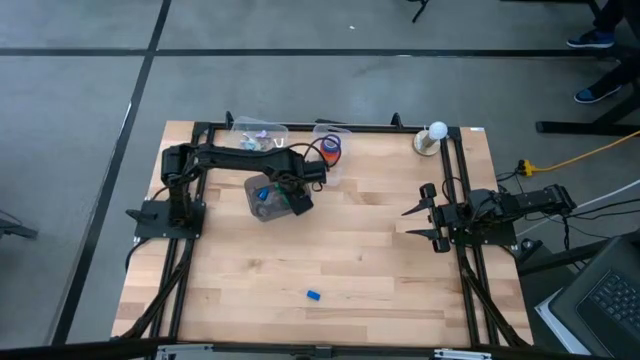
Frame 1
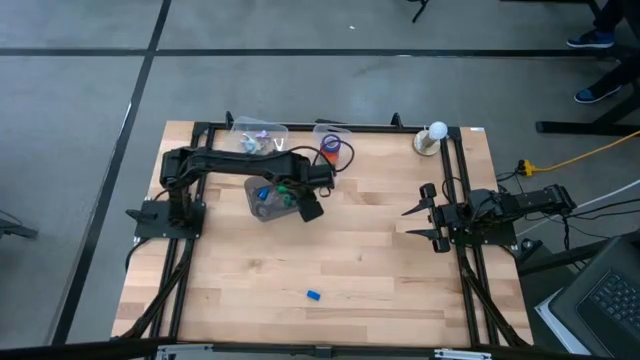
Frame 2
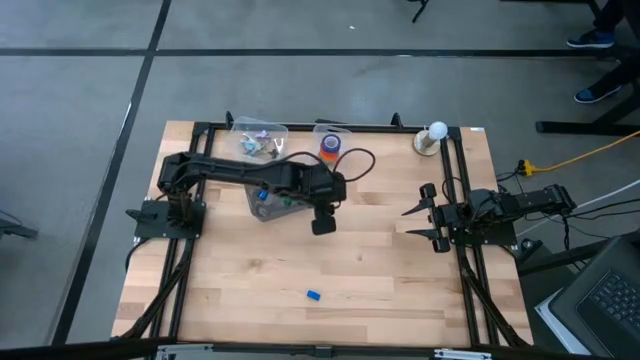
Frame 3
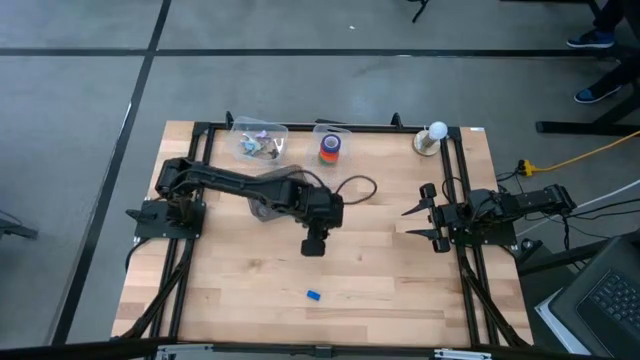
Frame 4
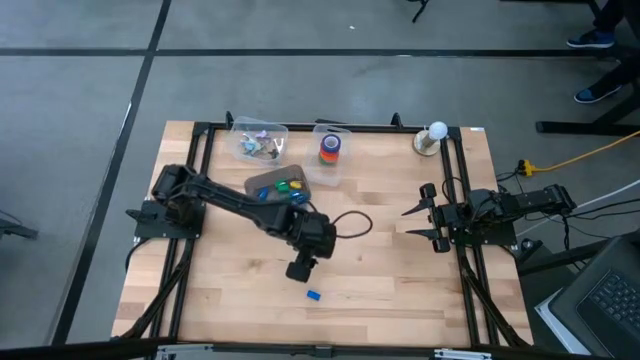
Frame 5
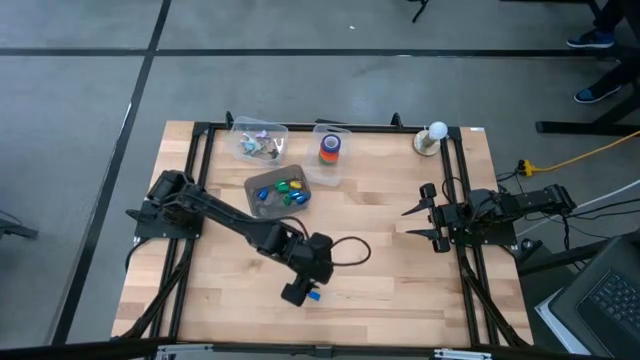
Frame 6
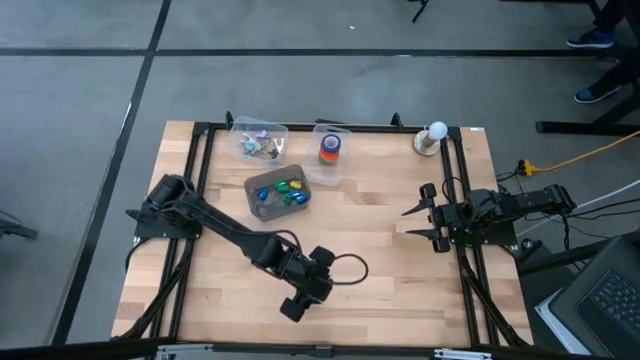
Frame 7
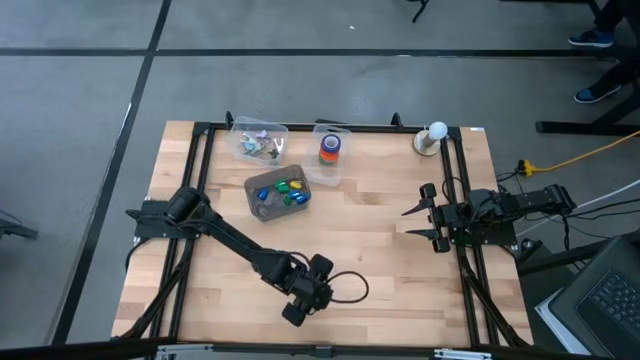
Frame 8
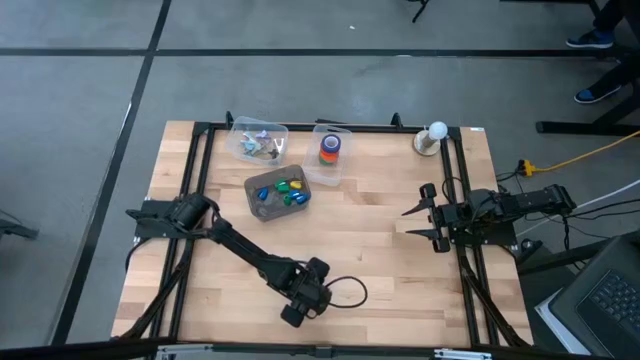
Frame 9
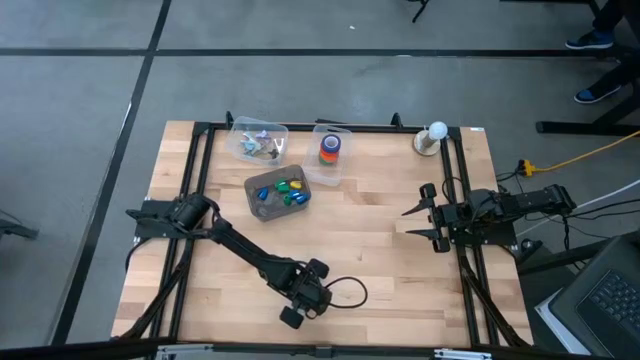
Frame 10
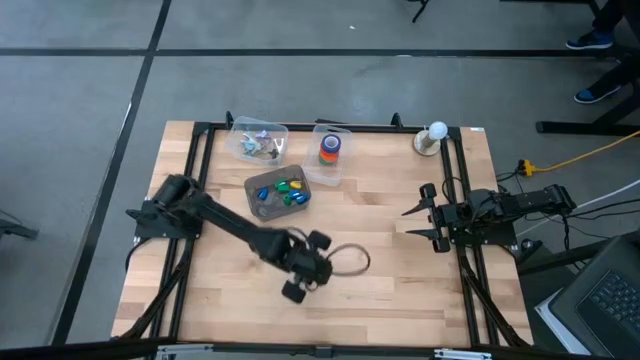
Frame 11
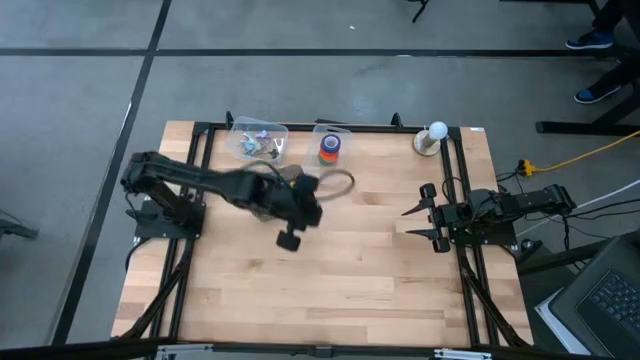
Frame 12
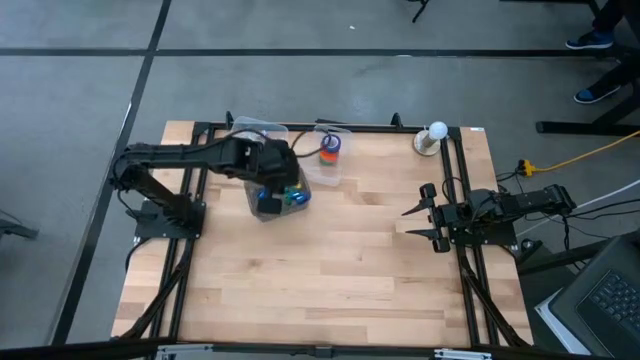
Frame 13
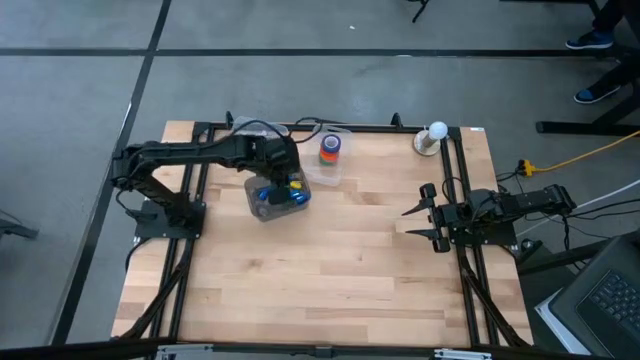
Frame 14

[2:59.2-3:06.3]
Task: Pick and place Stapler, Stapler remover, tape
Put the blue stapler into the black bin

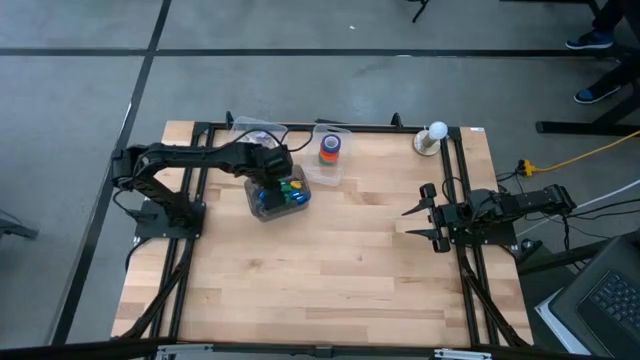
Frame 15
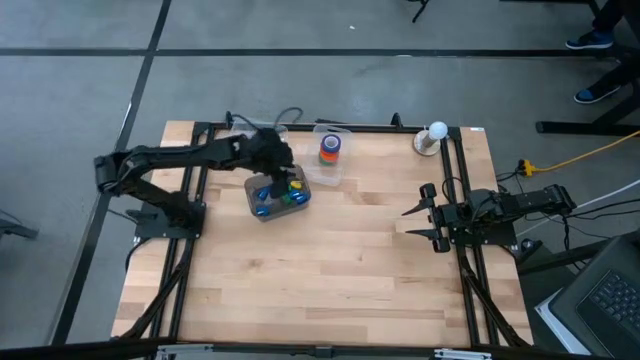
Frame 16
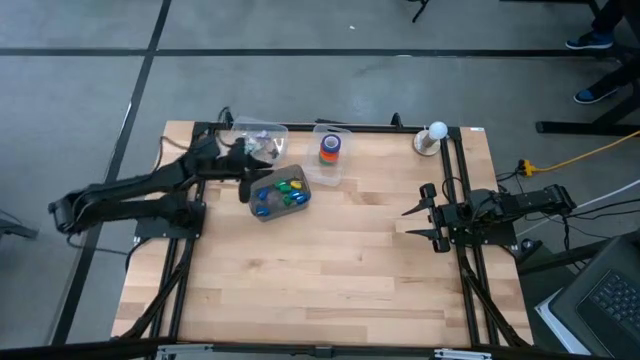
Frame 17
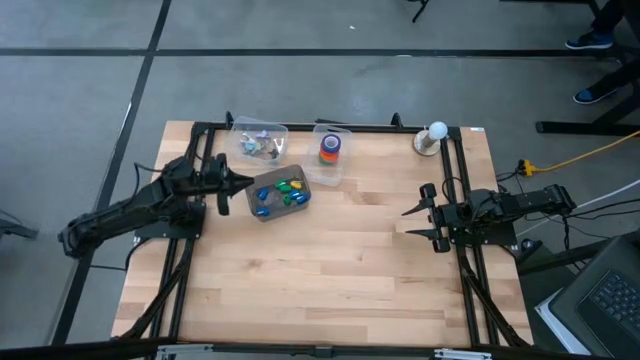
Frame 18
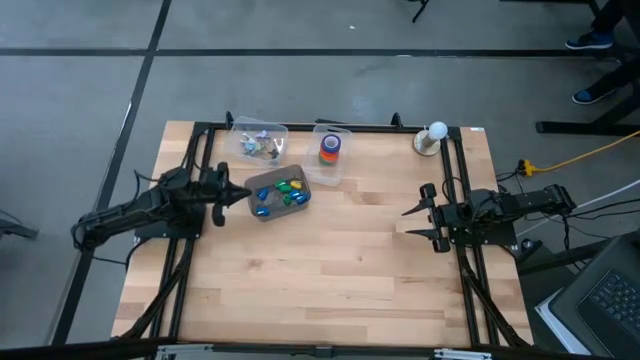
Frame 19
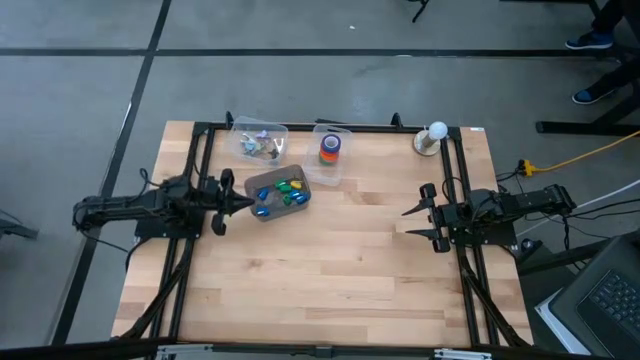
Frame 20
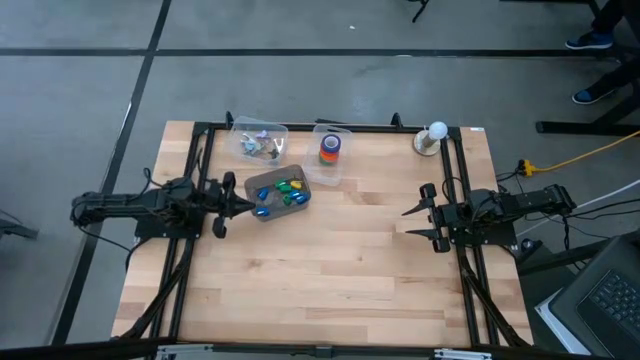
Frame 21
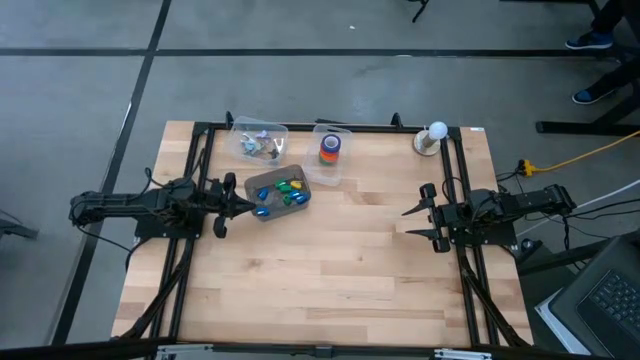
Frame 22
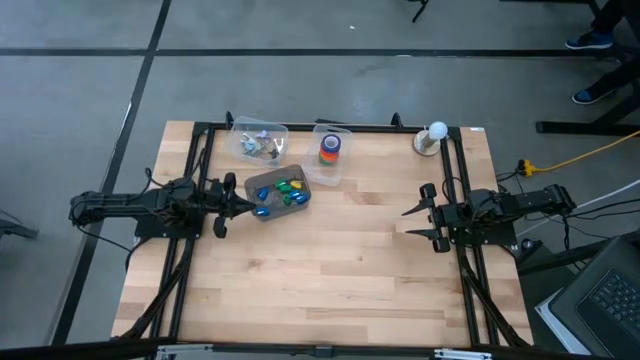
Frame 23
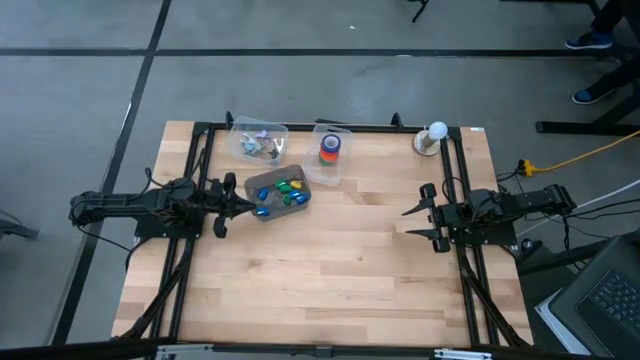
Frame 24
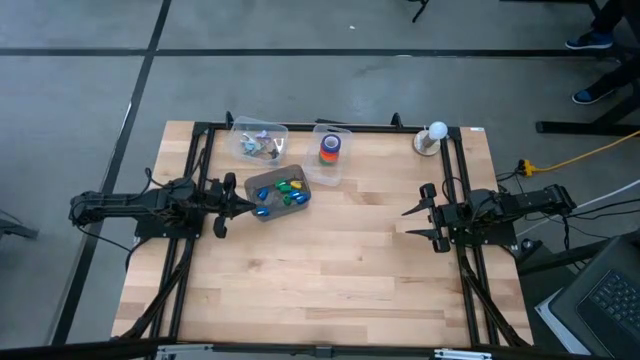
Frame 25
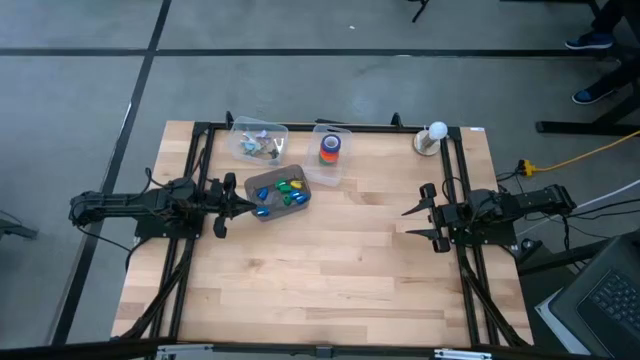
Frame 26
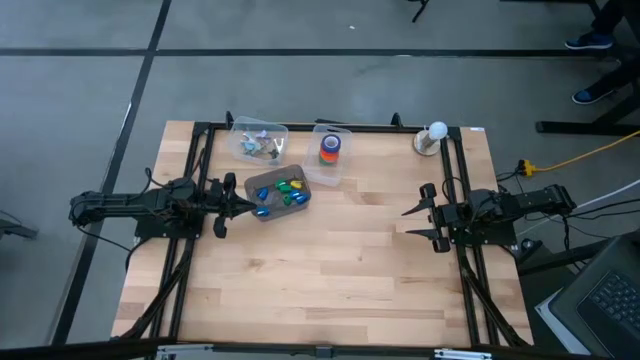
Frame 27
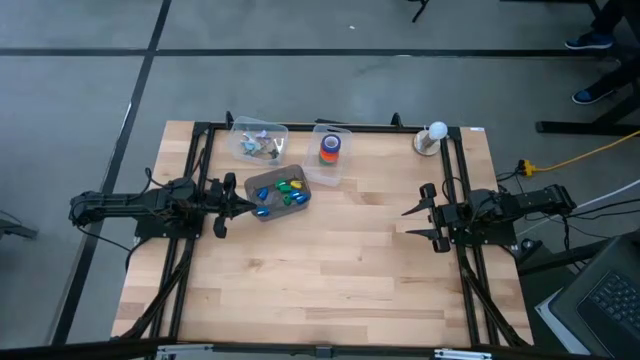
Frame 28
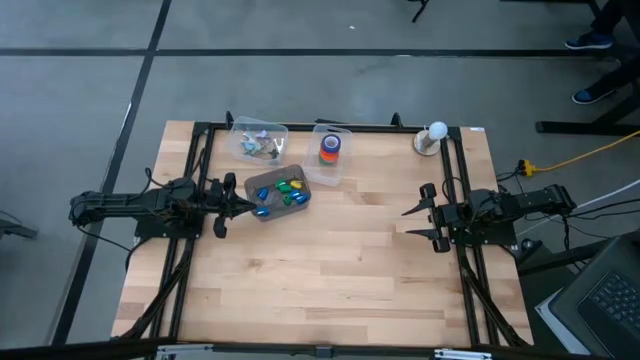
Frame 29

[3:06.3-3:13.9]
Return to Home Position

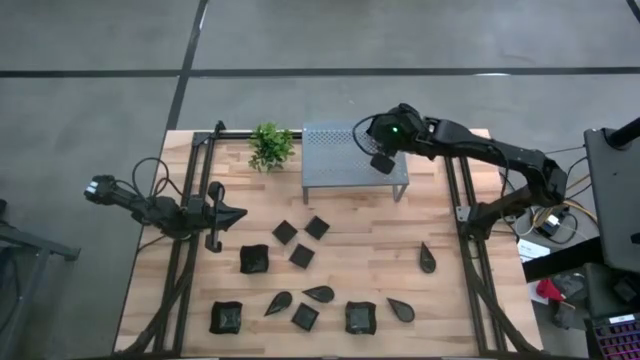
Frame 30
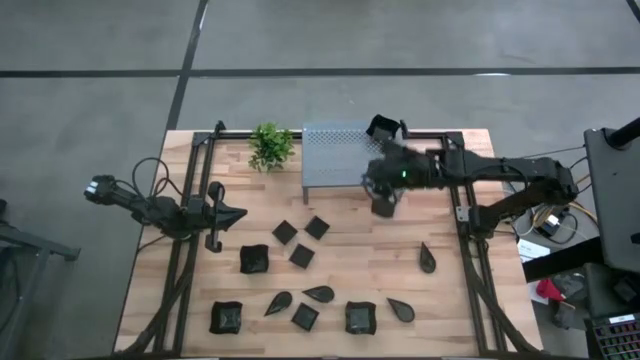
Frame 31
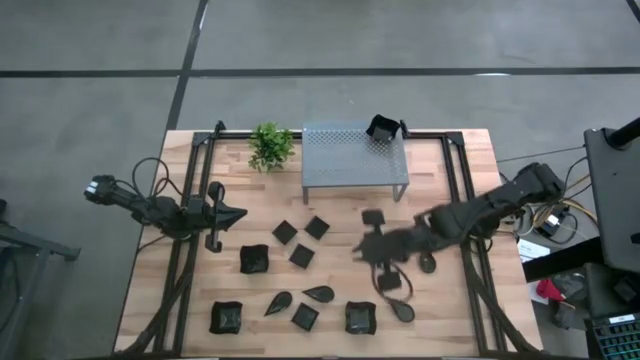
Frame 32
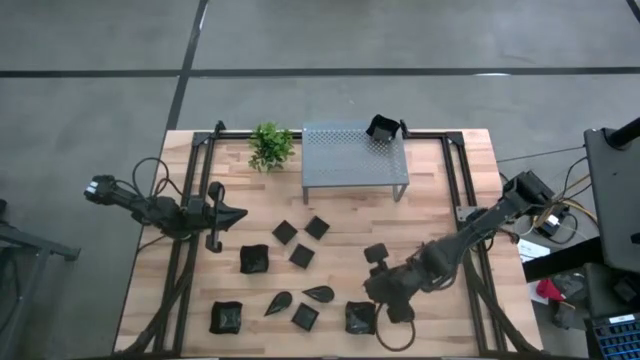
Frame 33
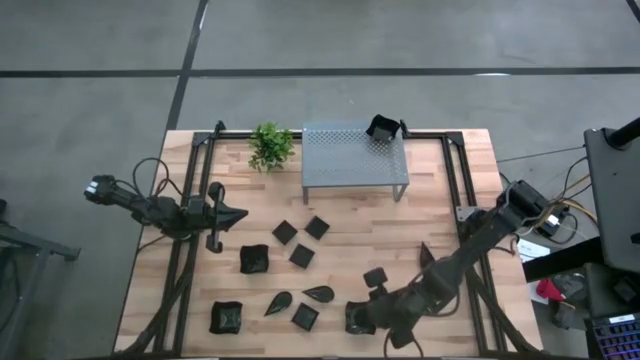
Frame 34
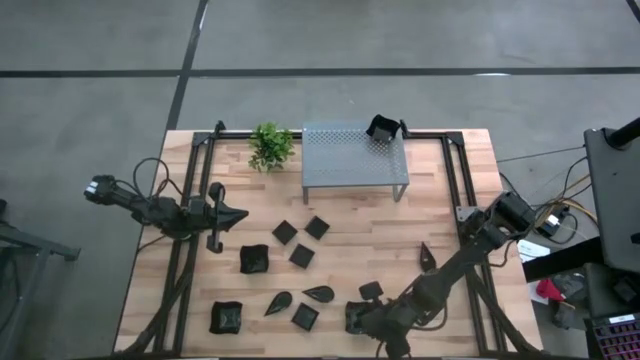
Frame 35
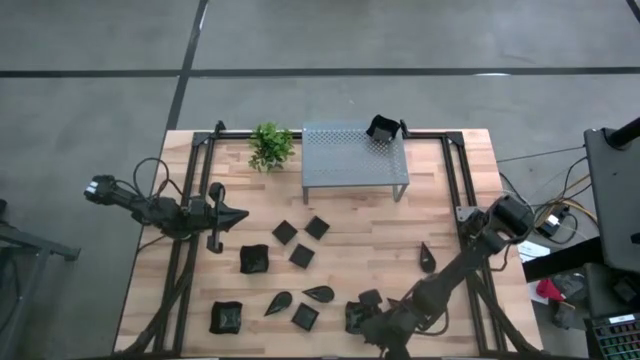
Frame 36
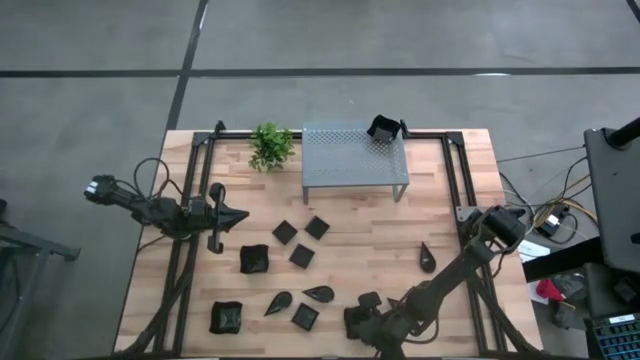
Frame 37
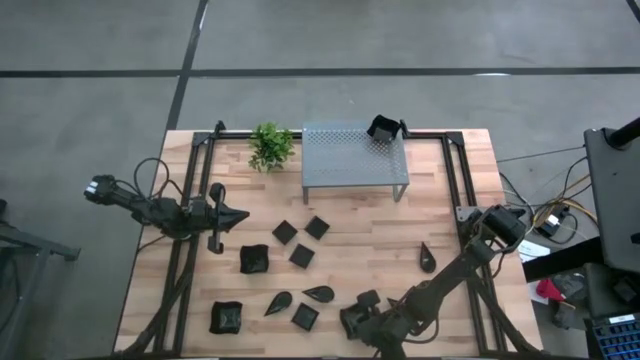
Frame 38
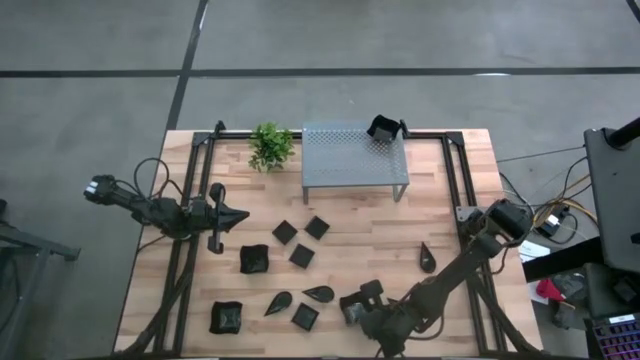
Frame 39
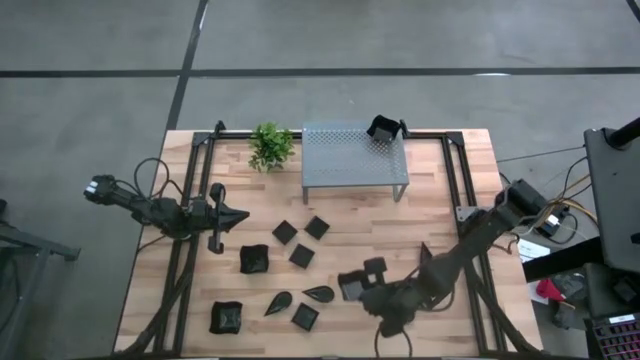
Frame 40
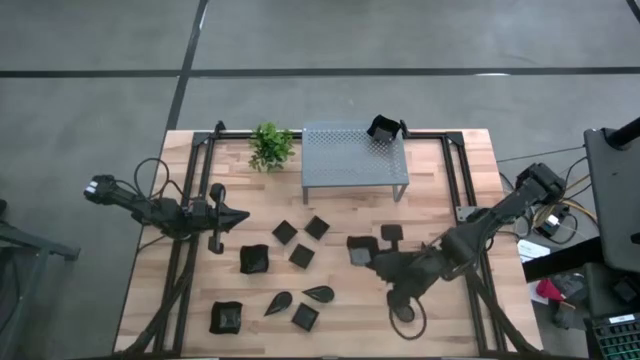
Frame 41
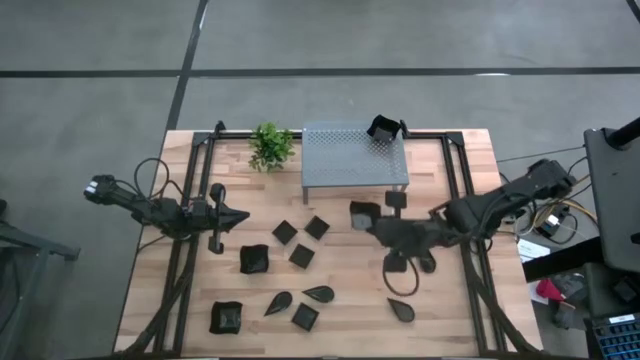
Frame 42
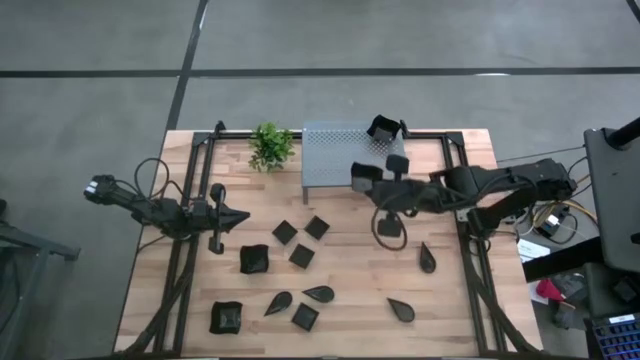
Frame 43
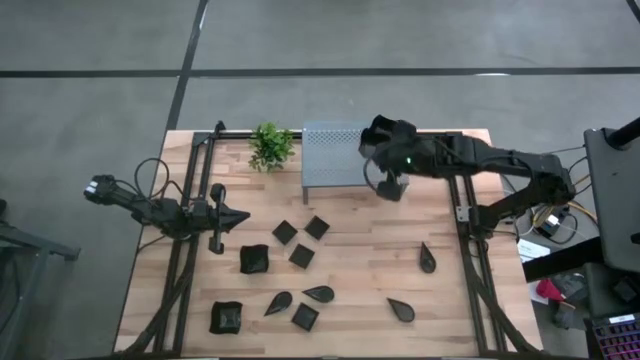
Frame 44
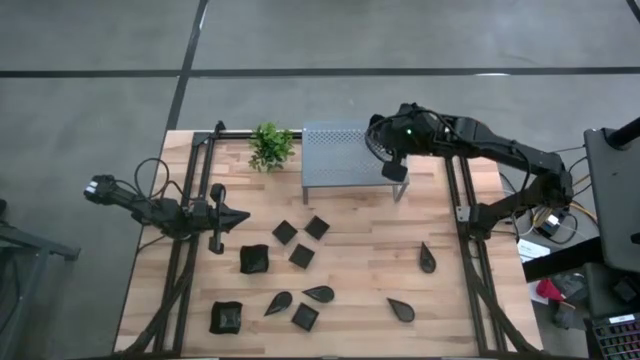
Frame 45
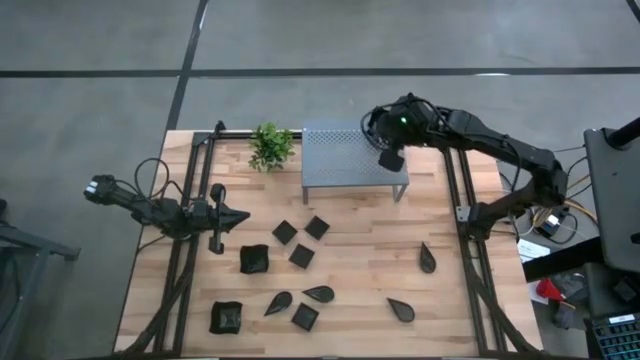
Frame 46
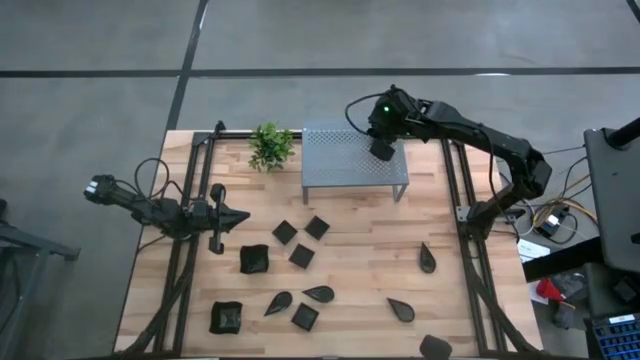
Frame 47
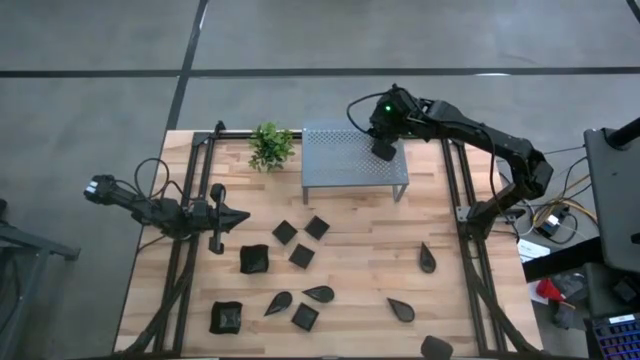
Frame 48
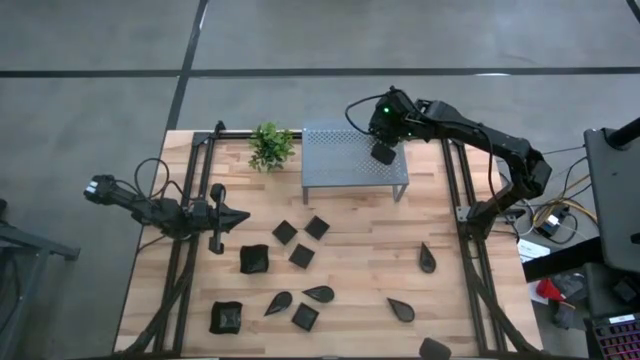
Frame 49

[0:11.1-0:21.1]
Task: Pick & Place Mini shaped plates
Stack the distorted square plate on top of the other distorted square plate on the shelf
